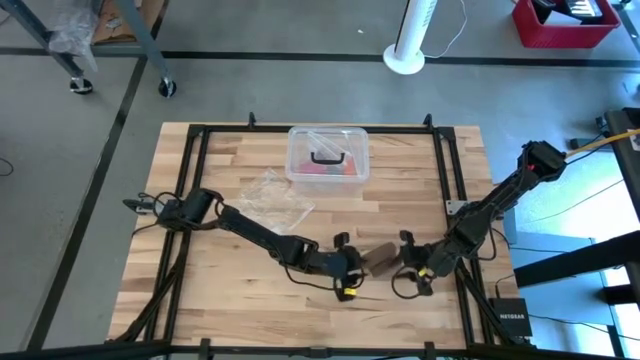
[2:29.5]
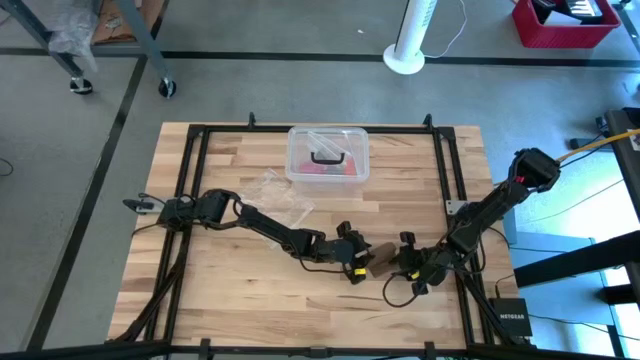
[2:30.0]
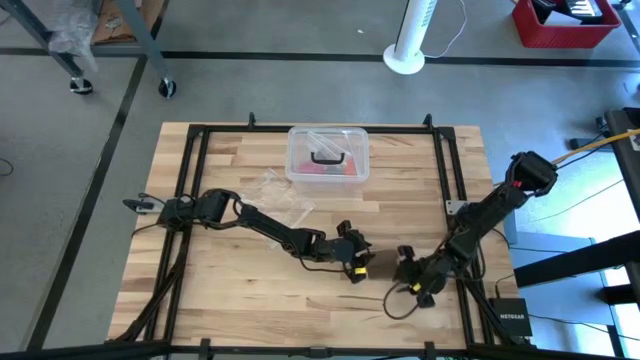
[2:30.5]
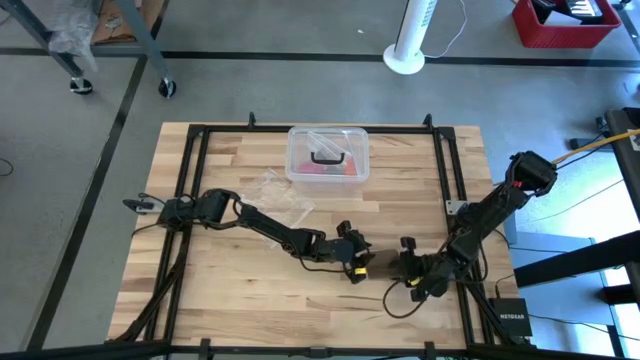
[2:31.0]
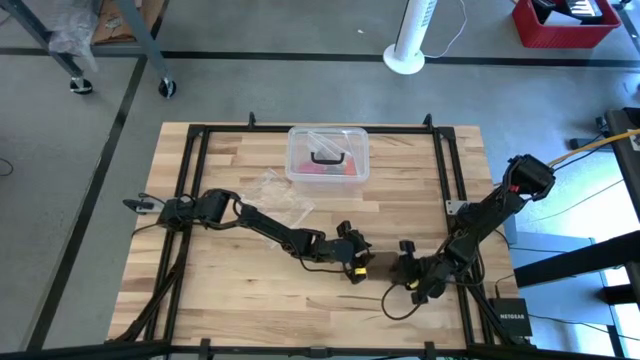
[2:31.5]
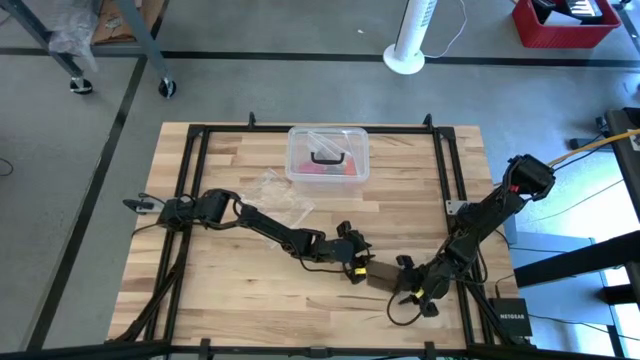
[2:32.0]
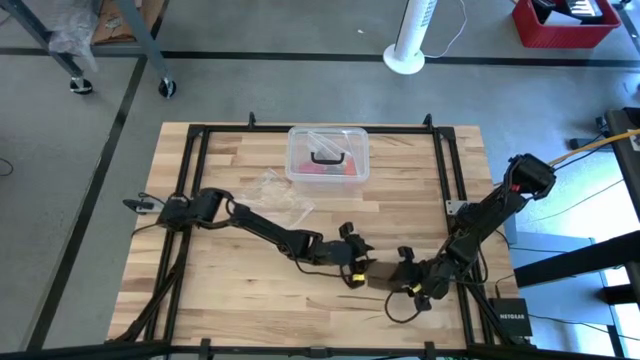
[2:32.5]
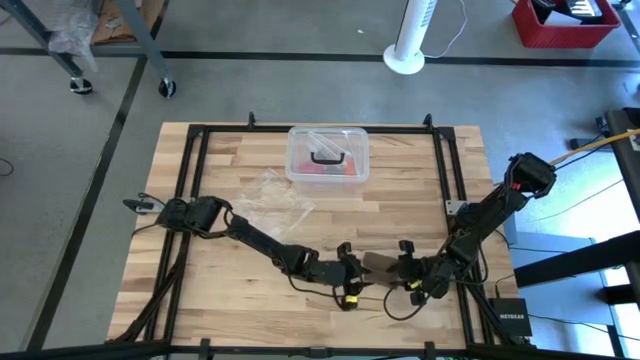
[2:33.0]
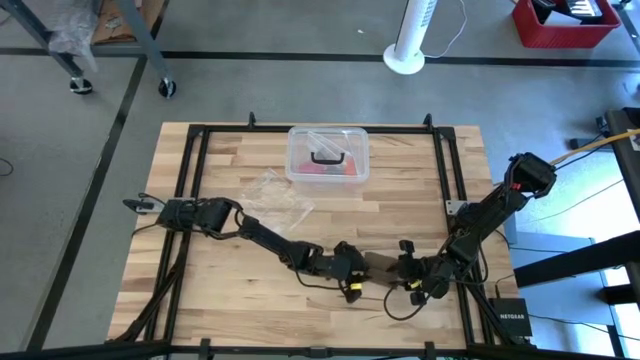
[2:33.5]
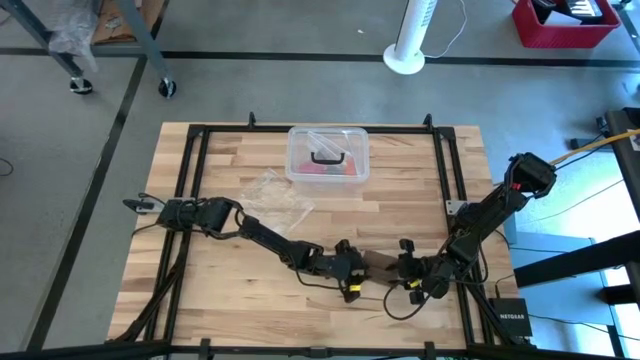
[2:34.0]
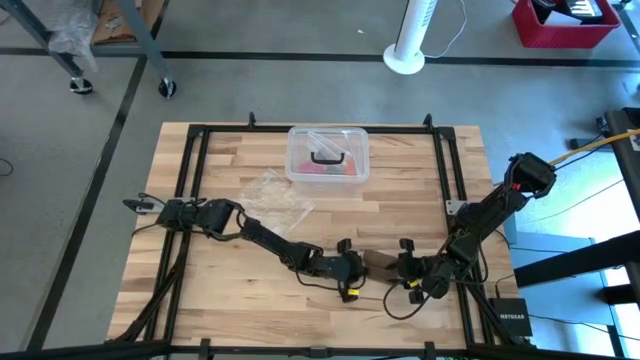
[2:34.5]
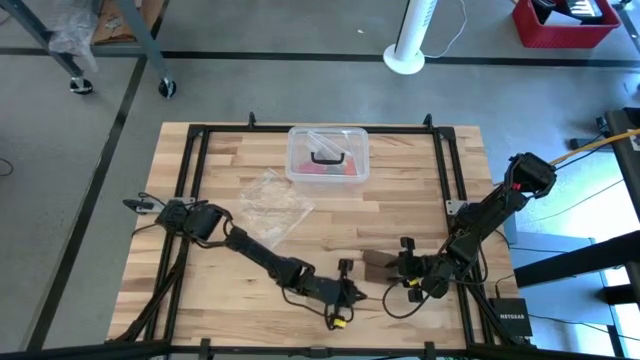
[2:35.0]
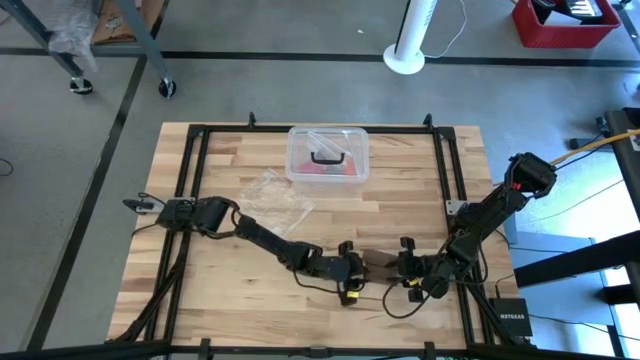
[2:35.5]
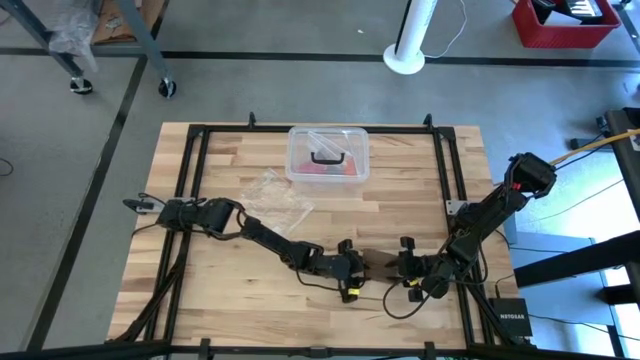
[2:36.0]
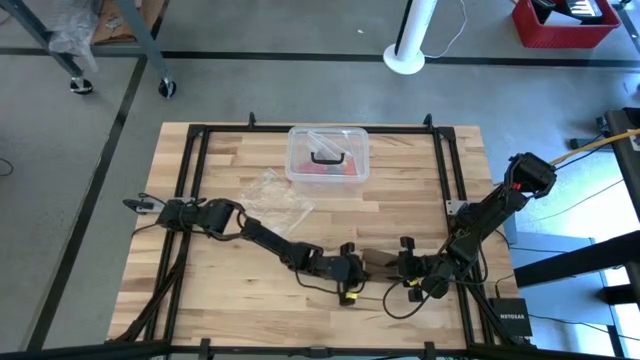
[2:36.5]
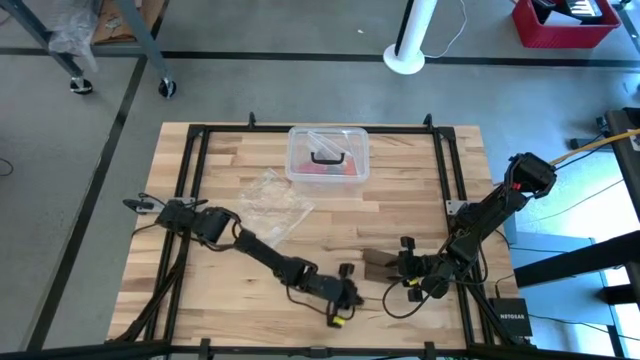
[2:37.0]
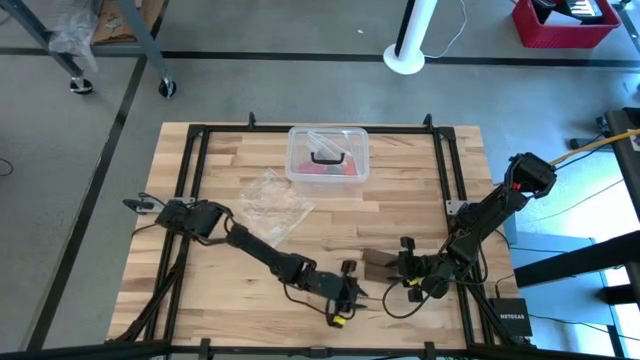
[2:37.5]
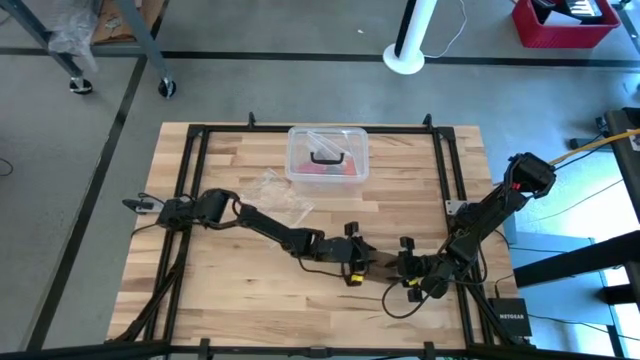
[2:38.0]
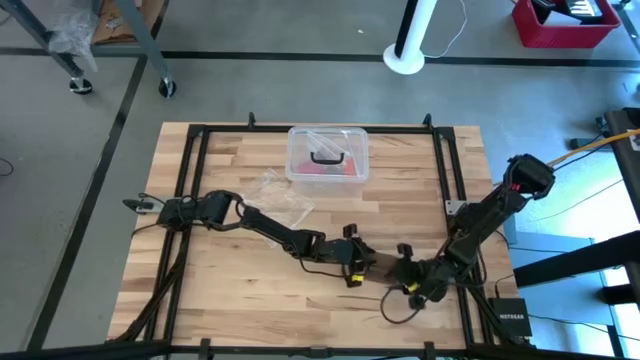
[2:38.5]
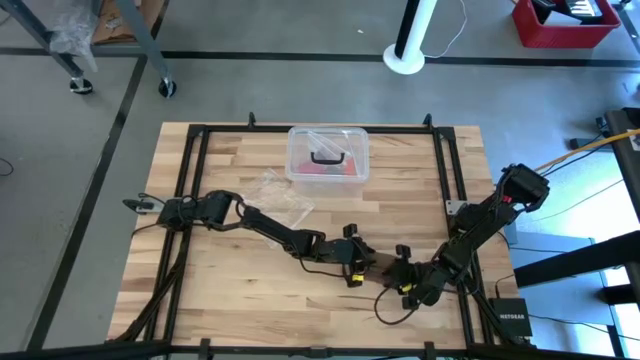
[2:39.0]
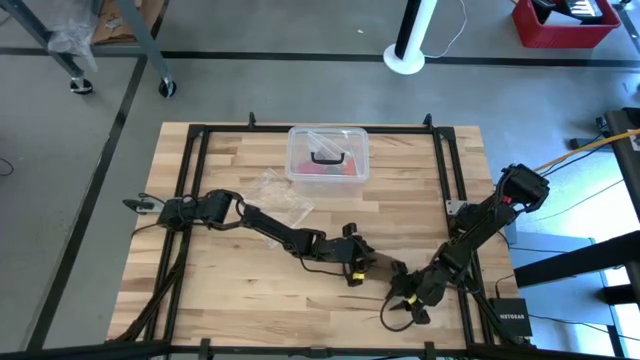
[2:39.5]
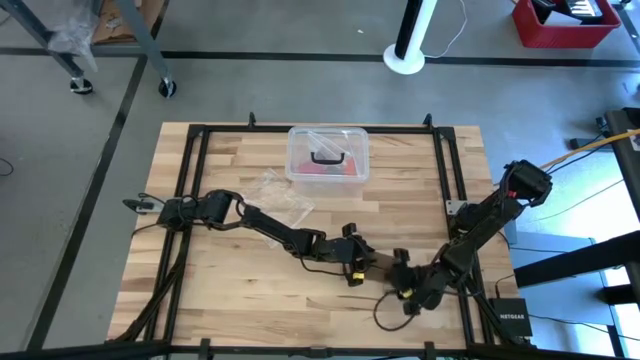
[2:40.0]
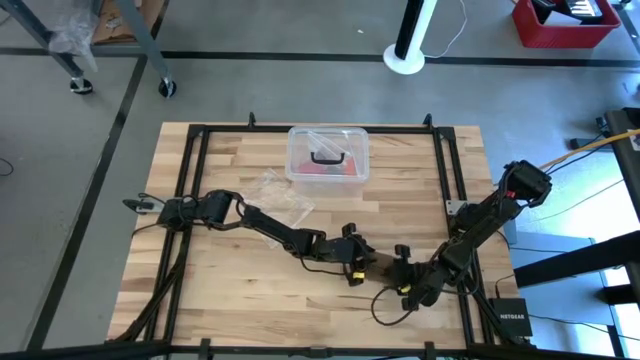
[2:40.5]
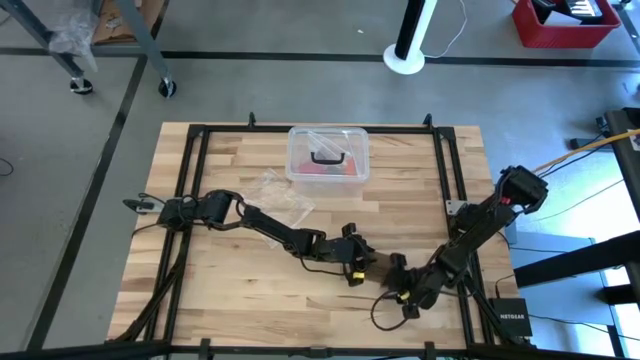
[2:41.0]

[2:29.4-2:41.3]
Task: Roll bandage
Roll the brown bandage

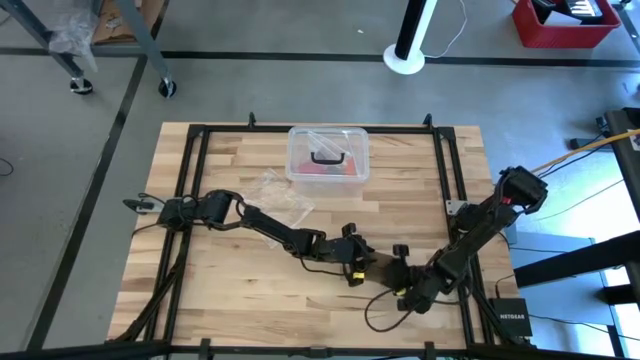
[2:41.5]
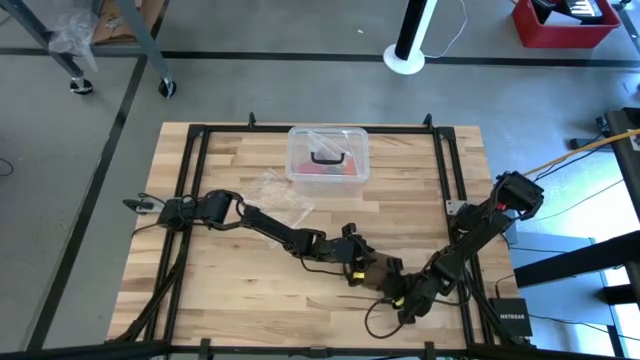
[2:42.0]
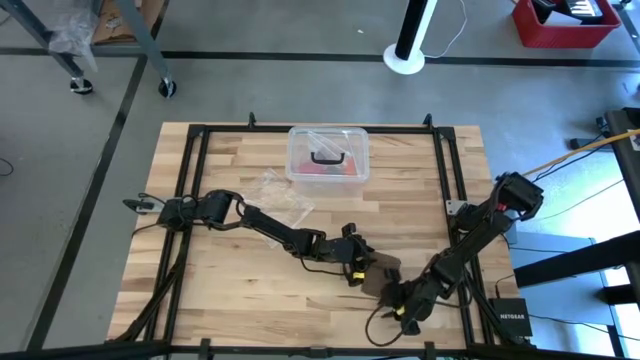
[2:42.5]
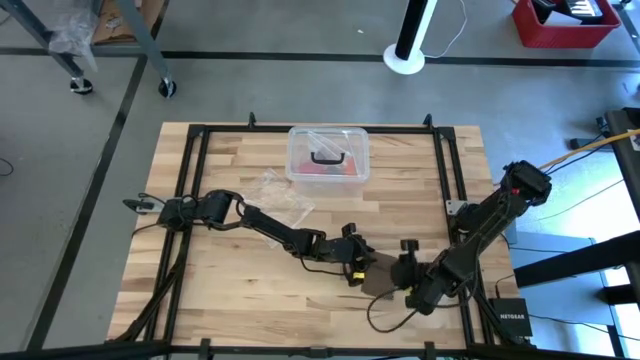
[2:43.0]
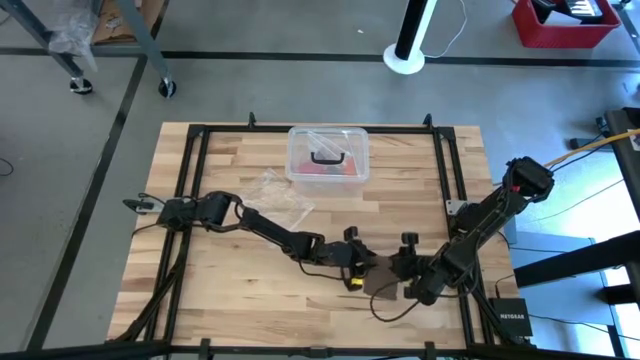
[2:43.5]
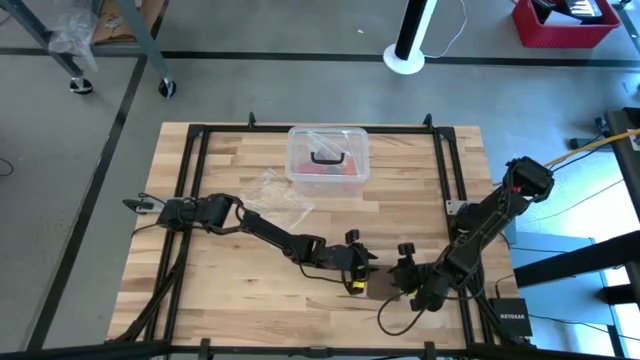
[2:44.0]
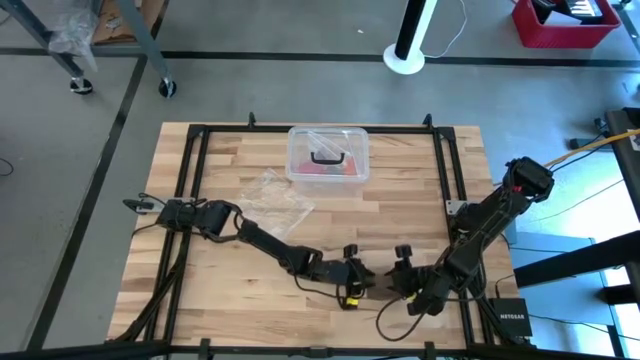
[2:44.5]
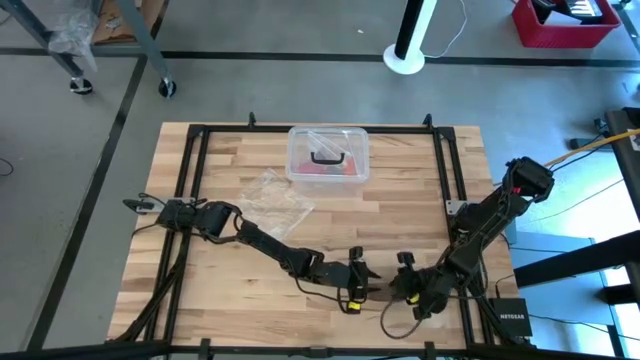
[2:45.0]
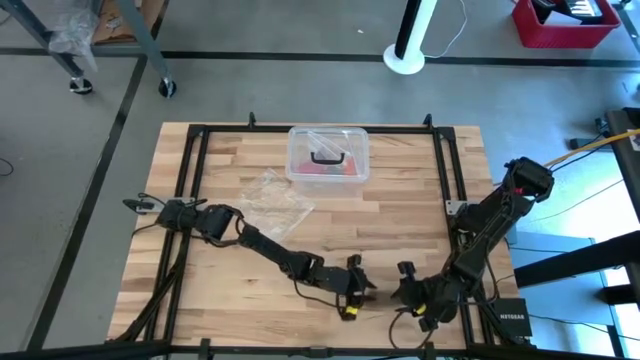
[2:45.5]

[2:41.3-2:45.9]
Roll the brown bandage

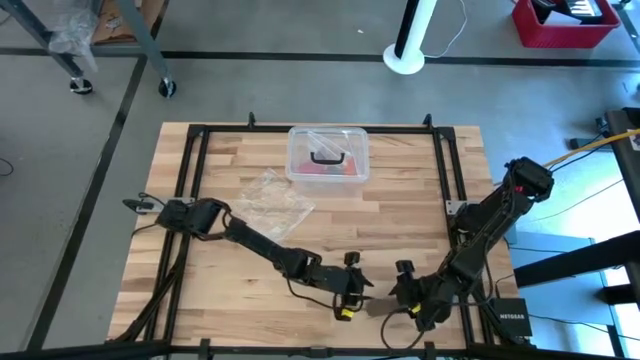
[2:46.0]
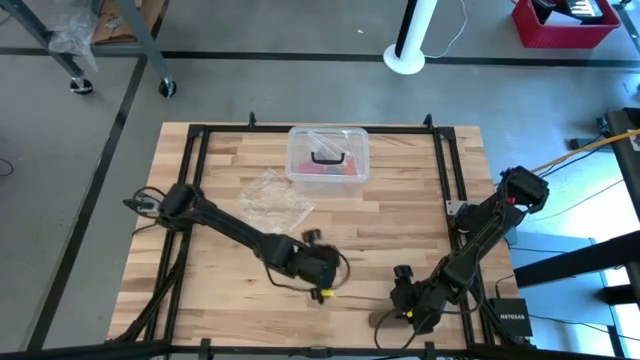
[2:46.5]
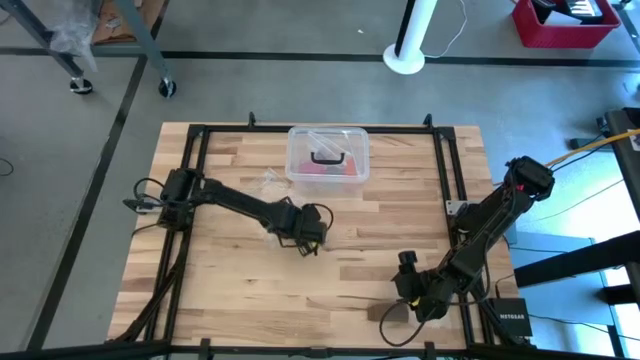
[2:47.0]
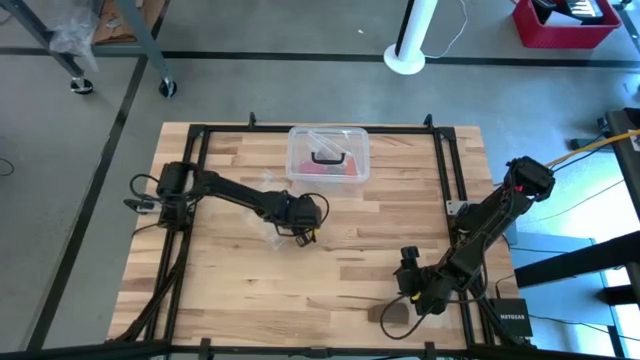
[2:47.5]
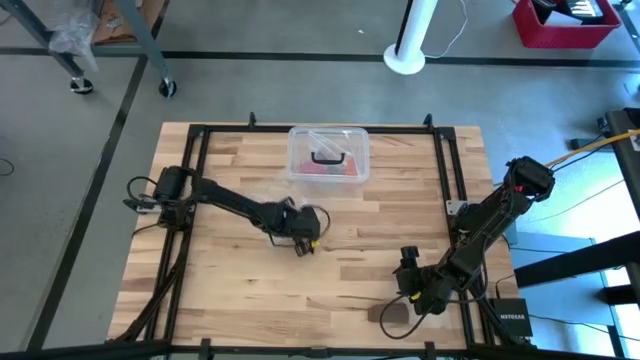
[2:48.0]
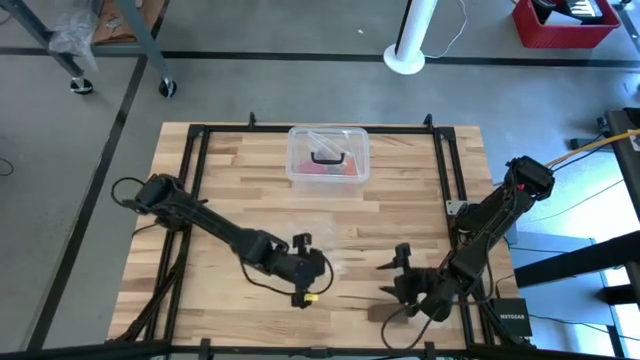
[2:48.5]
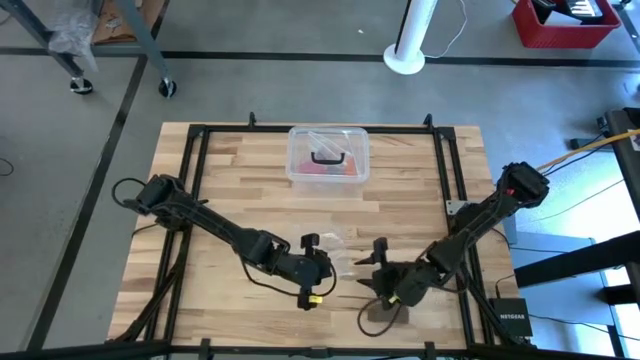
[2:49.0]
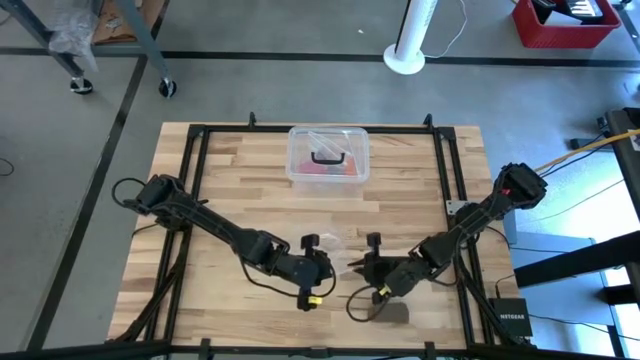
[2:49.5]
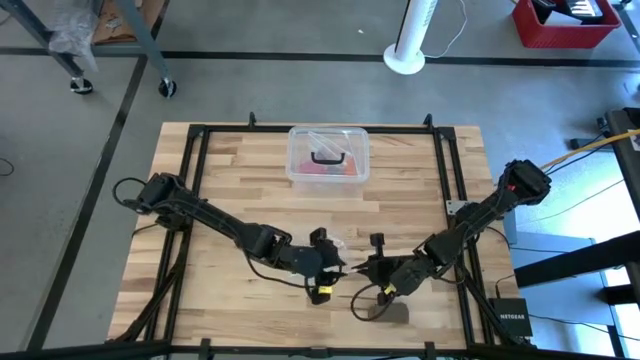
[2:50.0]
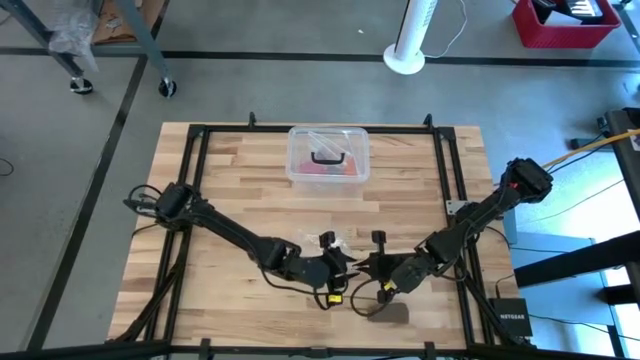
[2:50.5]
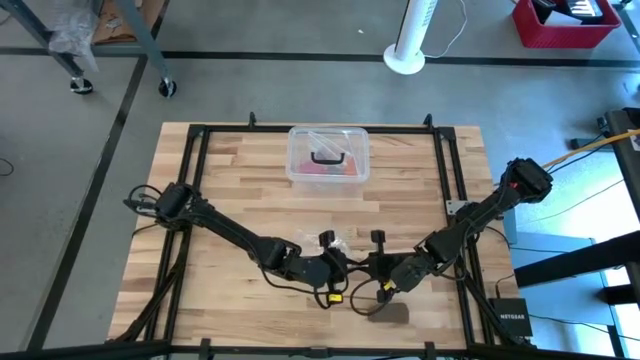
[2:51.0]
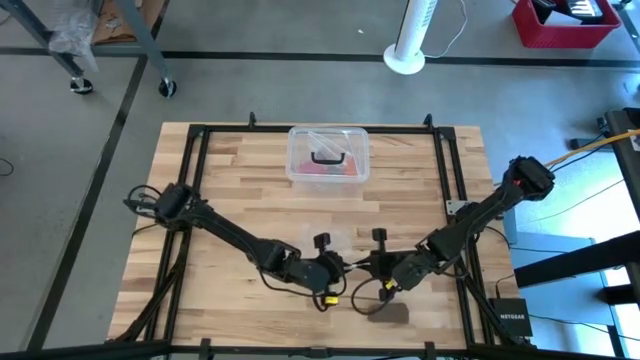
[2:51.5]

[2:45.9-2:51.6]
Open the transparent zip bag
